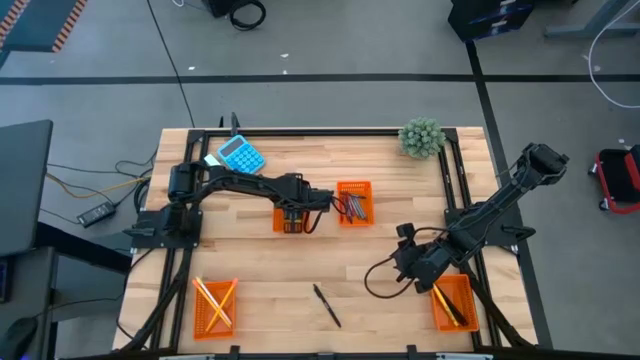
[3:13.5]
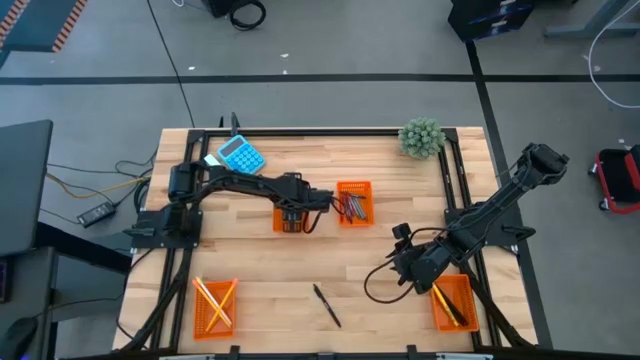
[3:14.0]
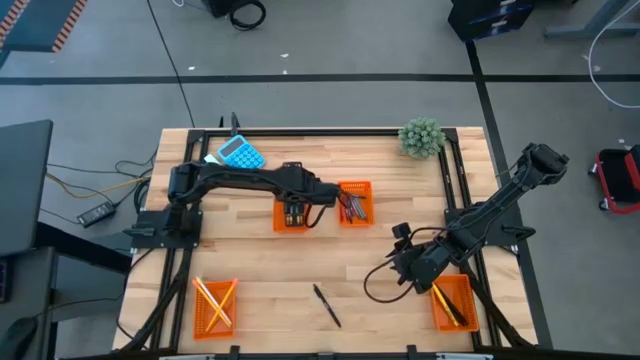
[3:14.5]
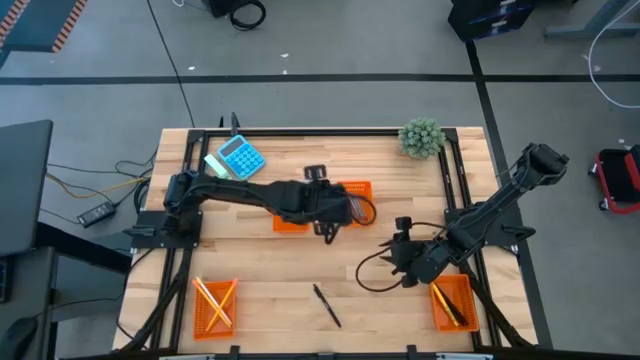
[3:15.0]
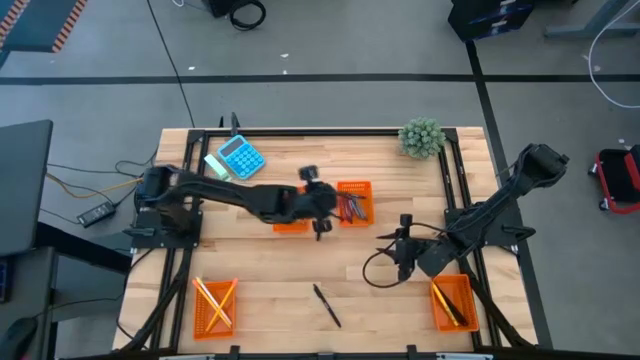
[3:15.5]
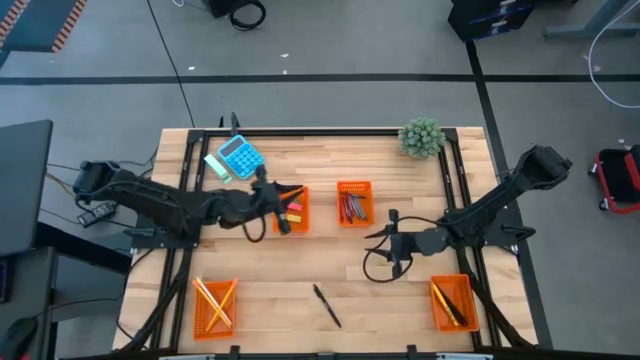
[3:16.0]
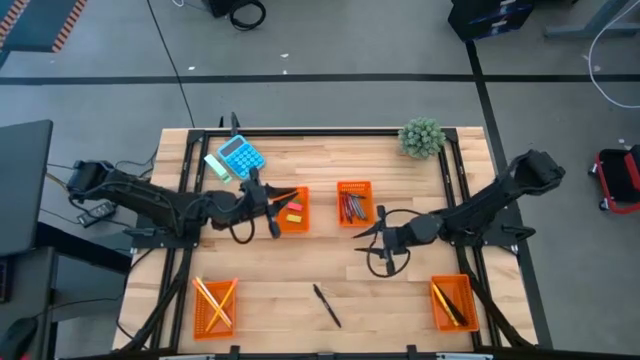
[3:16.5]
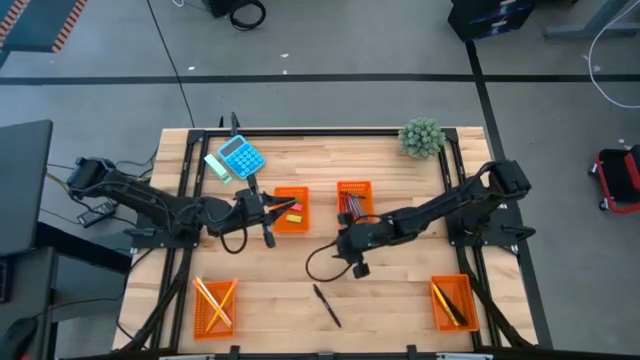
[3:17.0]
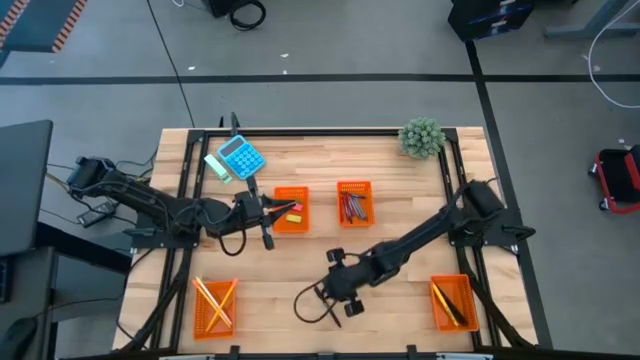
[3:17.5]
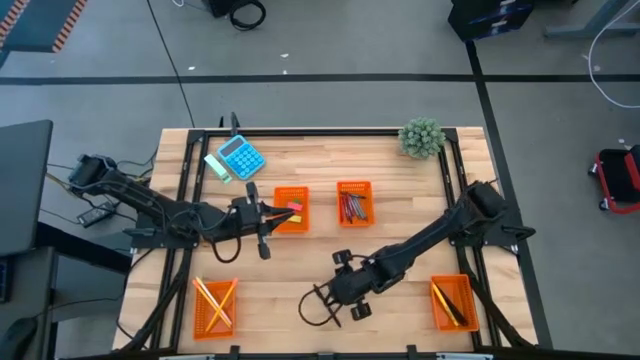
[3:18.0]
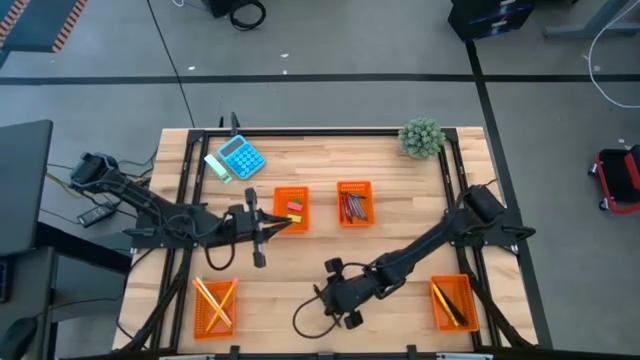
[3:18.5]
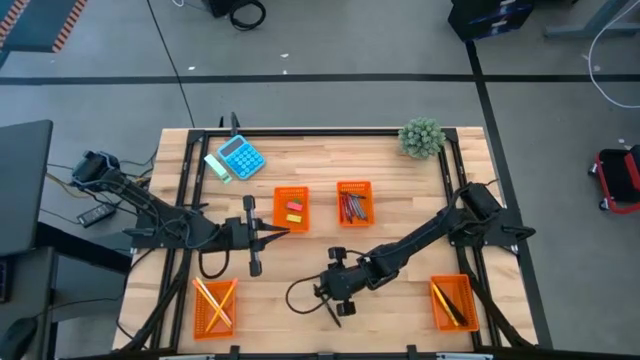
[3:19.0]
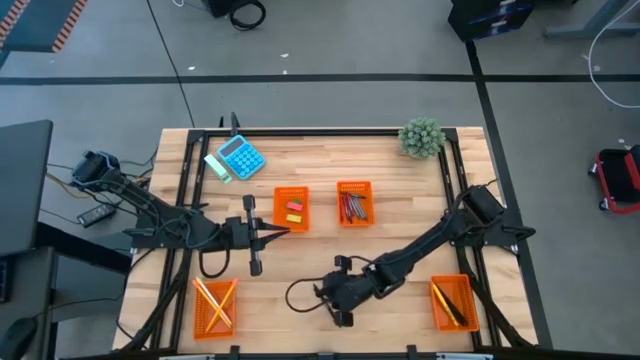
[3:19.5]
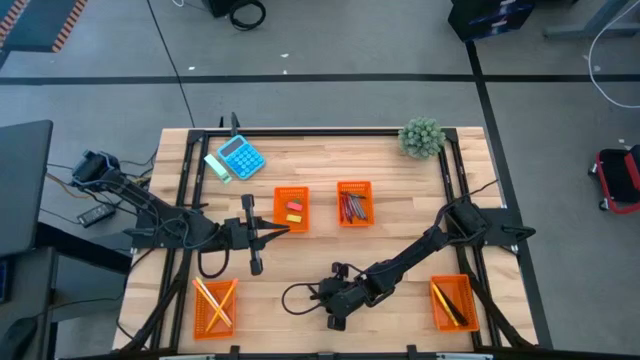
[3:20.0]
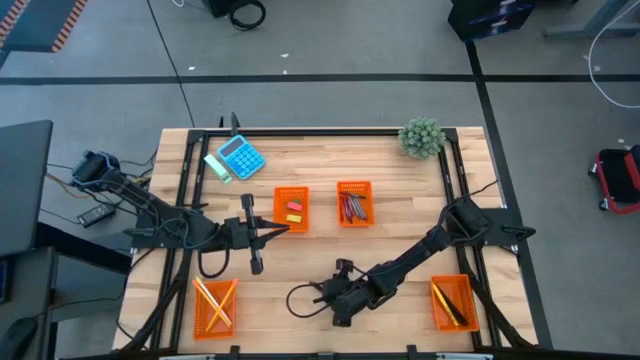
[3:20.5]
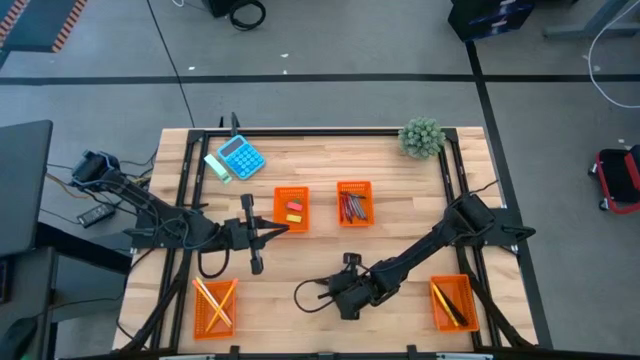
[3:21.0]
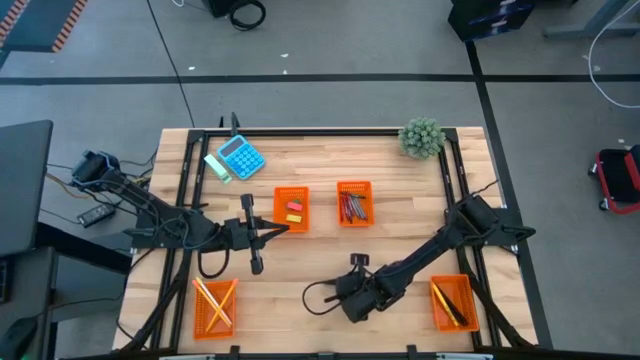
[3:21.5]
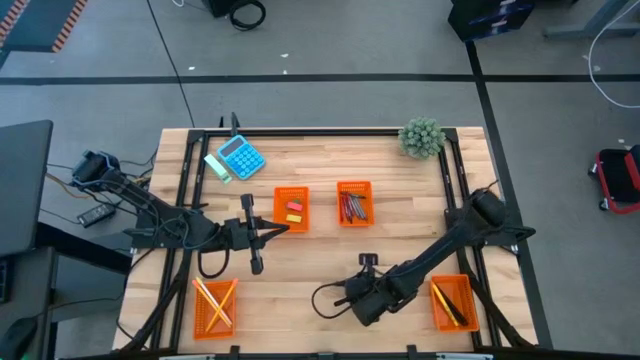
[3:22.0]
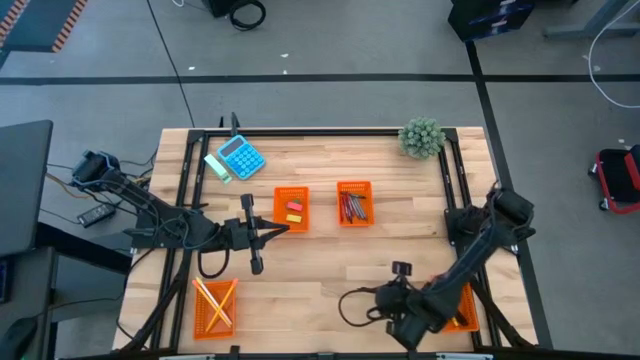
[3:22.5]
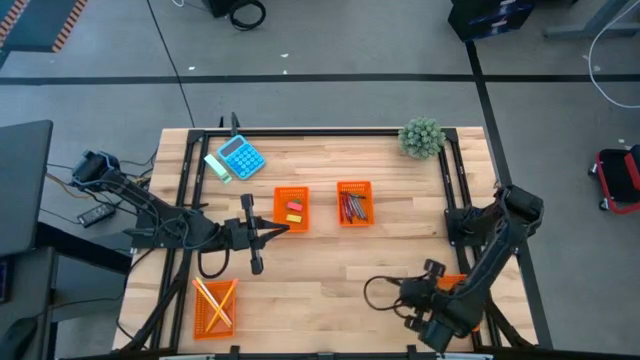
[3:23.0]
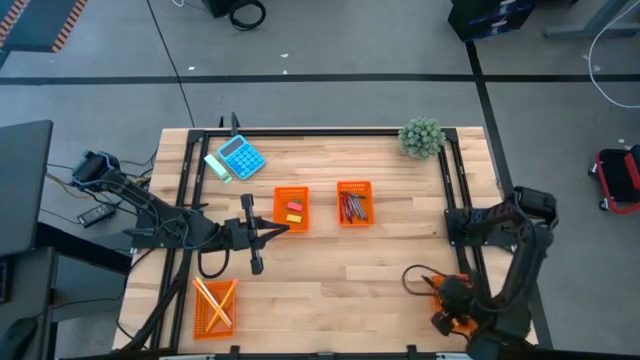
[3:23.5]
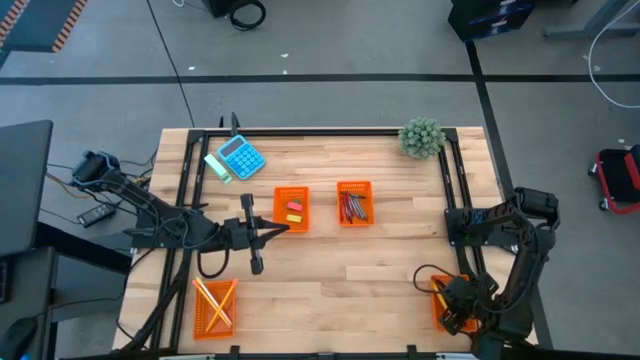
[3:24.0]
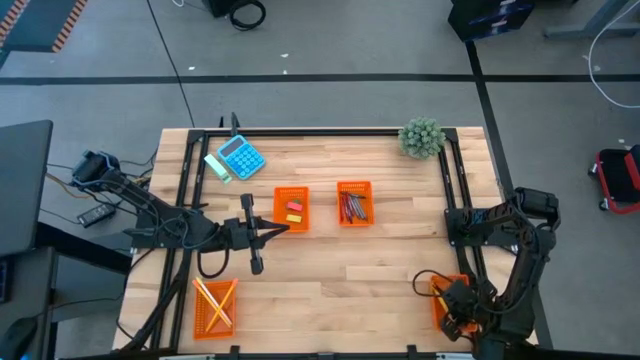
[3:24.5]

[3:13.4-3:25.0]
Task: Sort crayons/erasers/pens/pencils in bins
Put the black pen into the bottom right orange bin

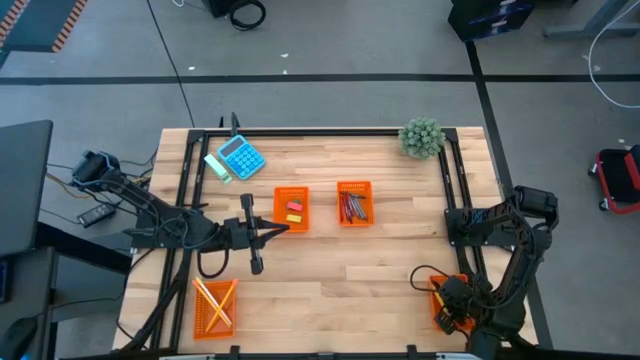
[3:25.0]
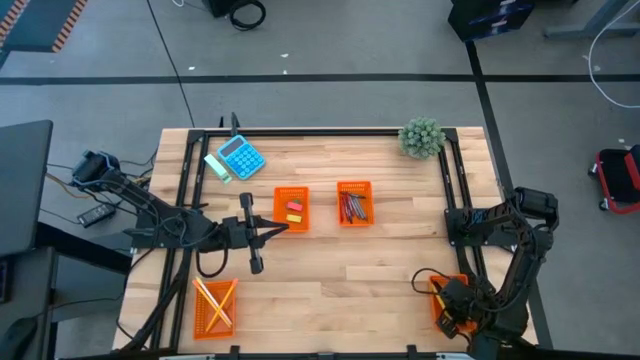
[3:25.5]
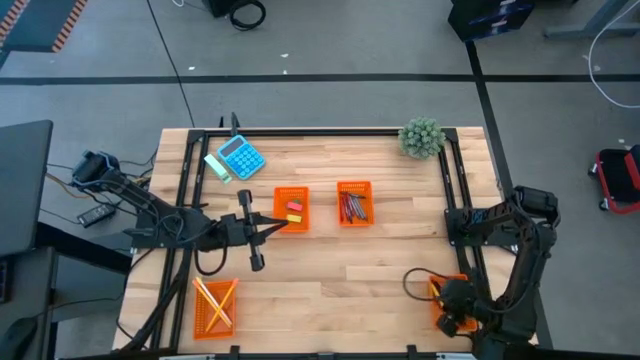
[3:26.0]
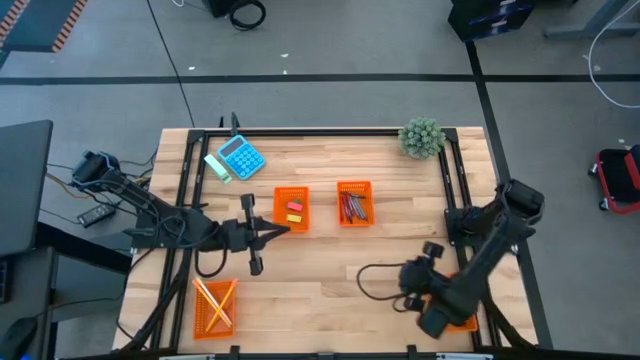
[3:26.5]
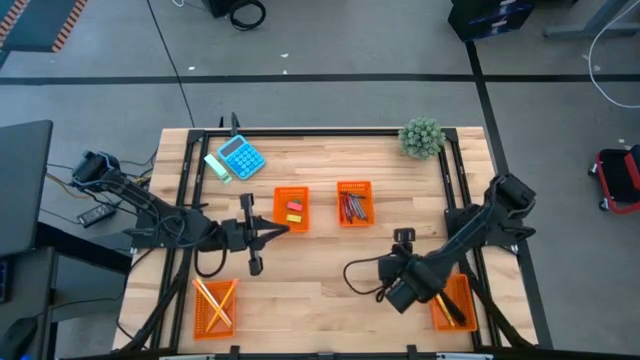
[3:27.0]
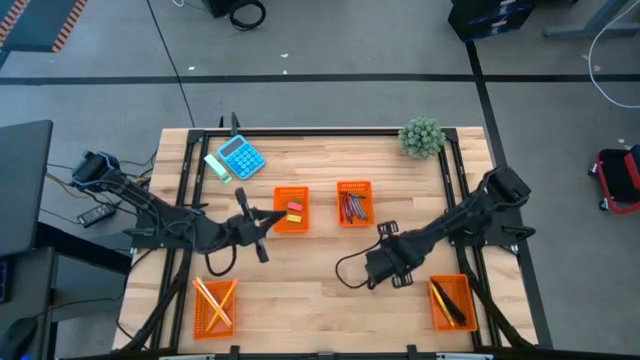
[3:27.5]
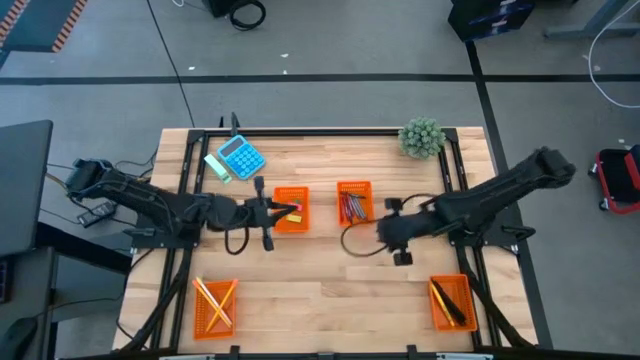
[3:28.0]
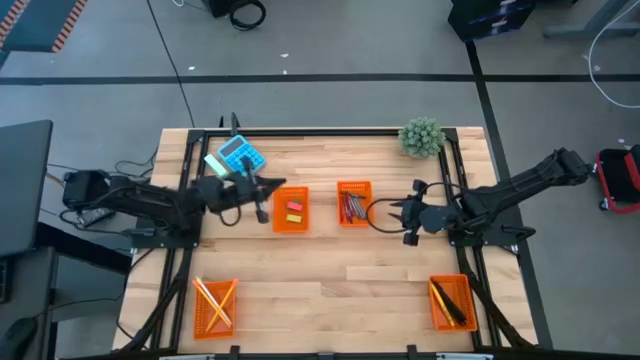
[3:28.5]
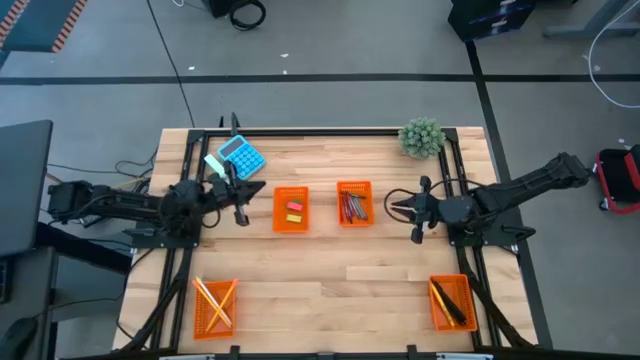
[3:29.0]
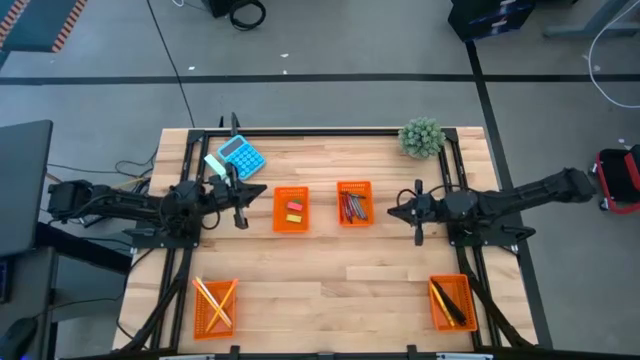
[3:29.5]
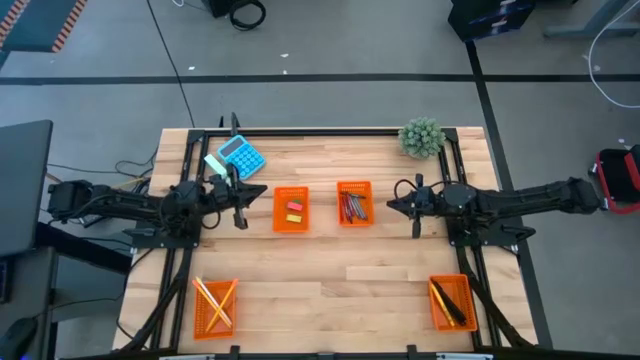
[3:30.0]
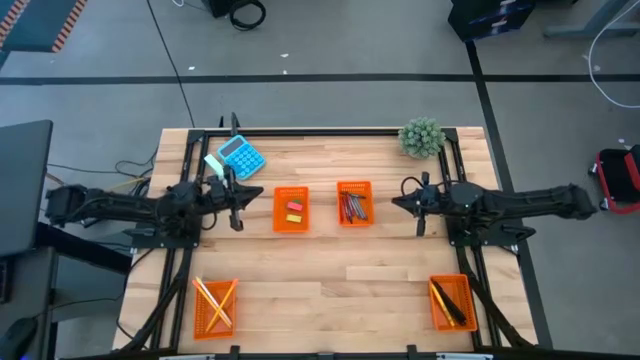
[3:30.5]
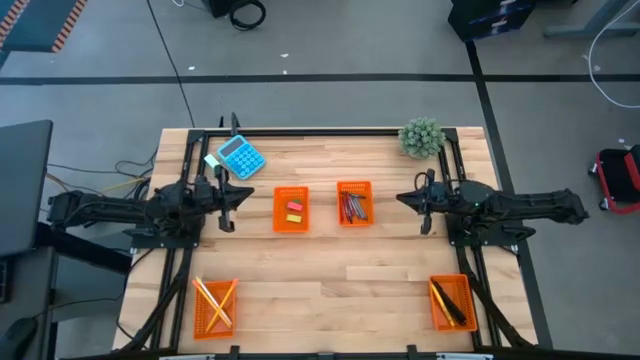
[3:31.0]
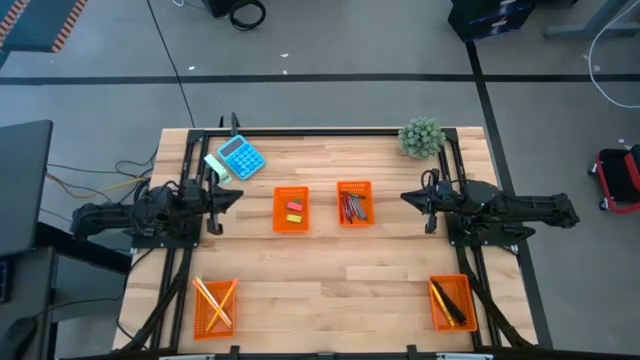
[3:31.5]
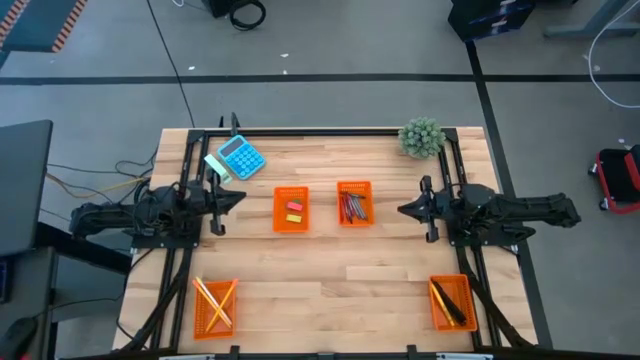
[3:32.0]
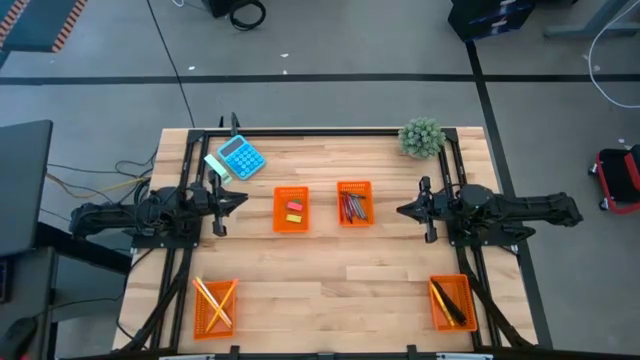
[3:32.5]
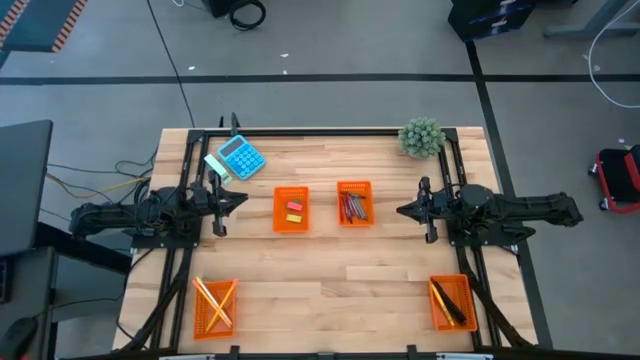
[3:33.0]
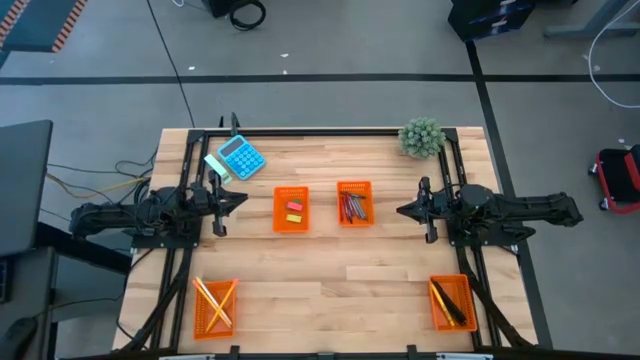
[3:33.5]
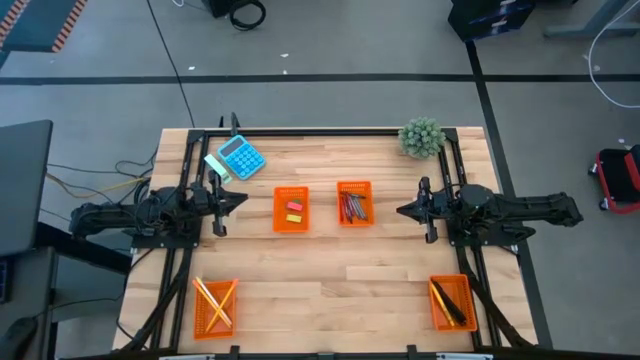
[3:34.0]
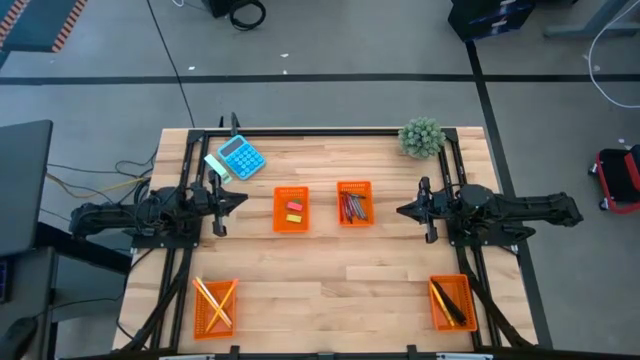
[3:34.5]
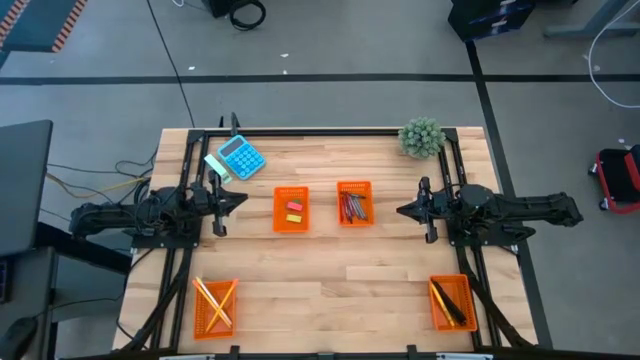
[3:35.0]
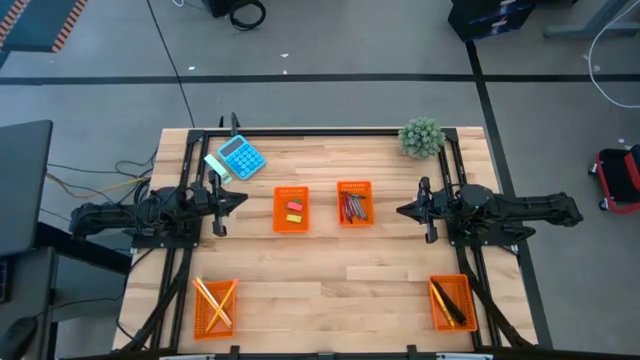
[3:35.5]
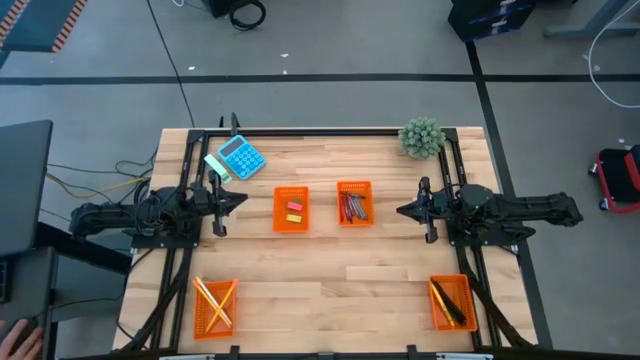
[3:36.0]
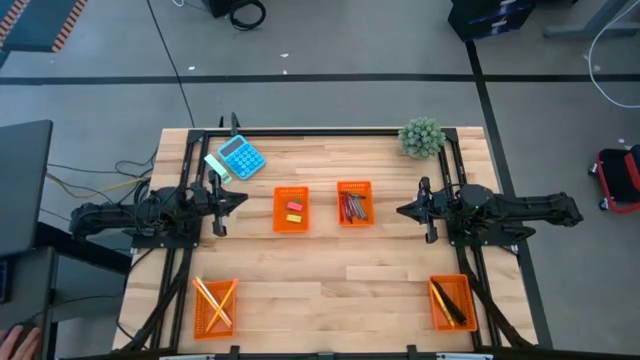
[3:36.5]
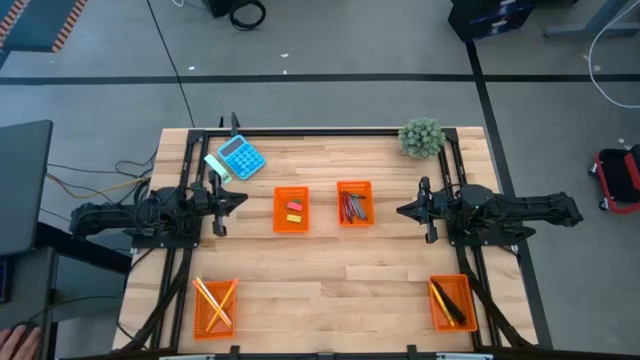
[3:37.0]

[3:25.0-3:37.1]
Return to Home Position
